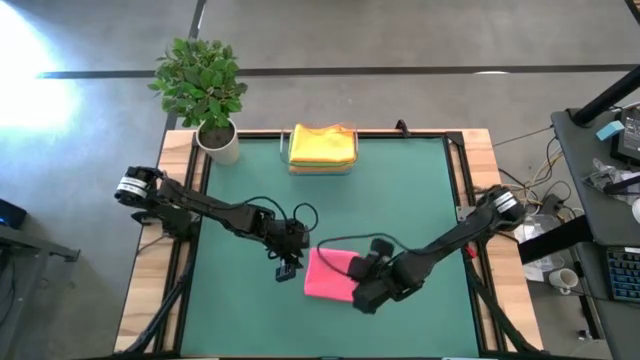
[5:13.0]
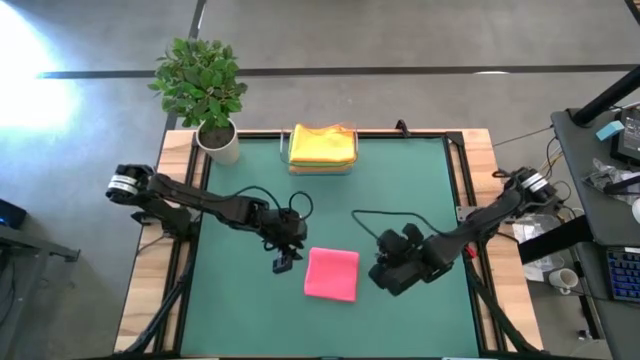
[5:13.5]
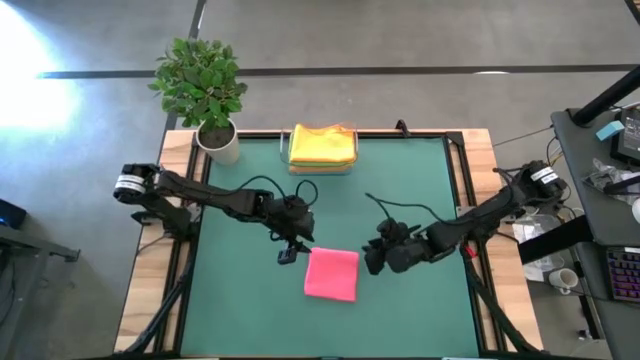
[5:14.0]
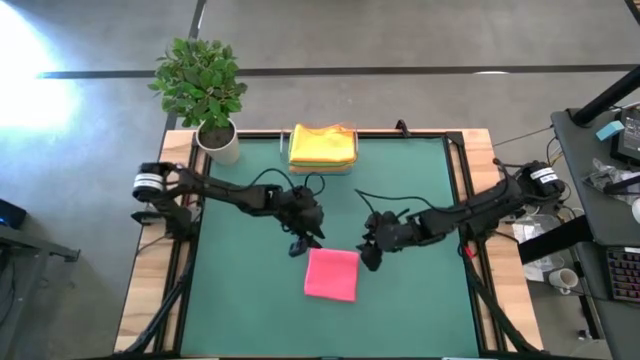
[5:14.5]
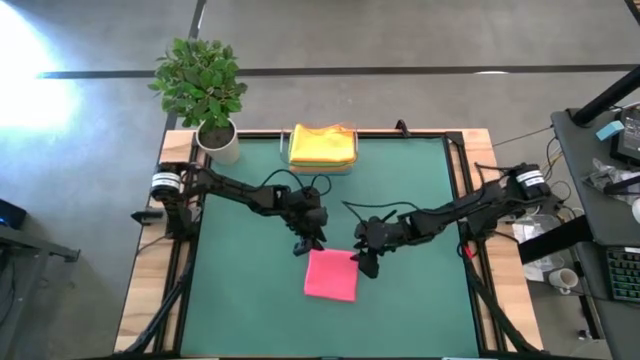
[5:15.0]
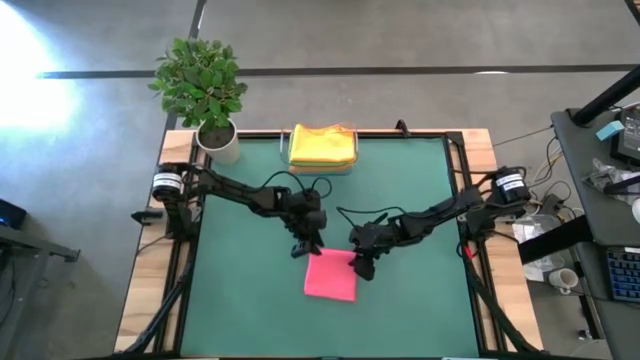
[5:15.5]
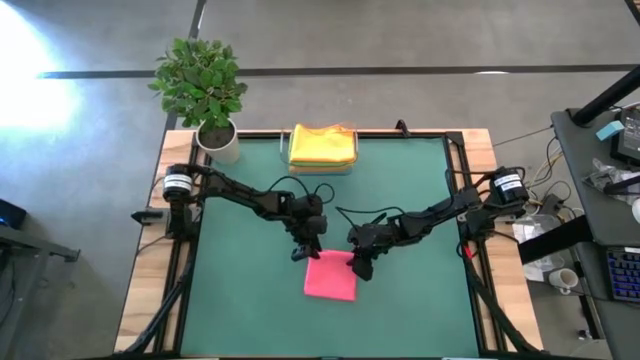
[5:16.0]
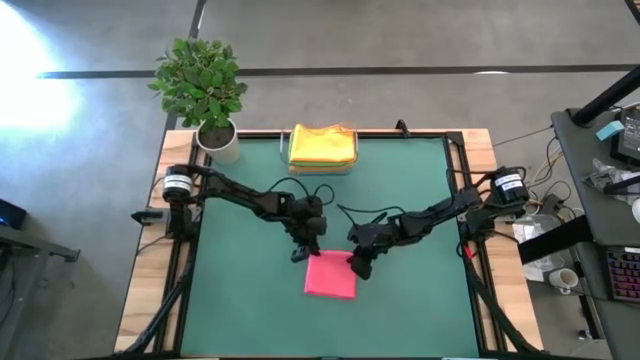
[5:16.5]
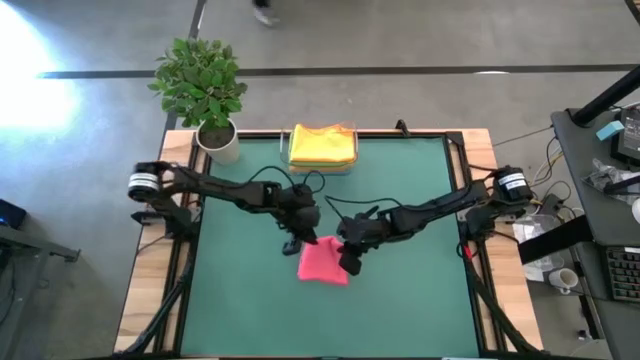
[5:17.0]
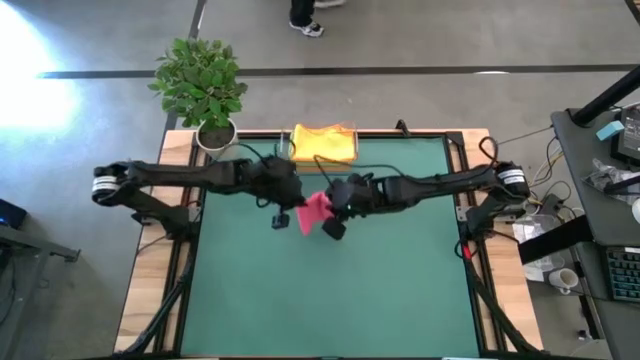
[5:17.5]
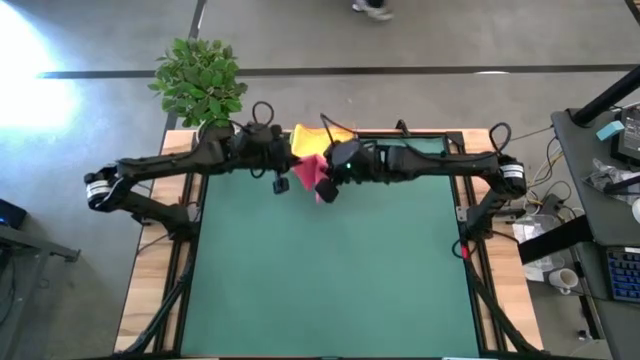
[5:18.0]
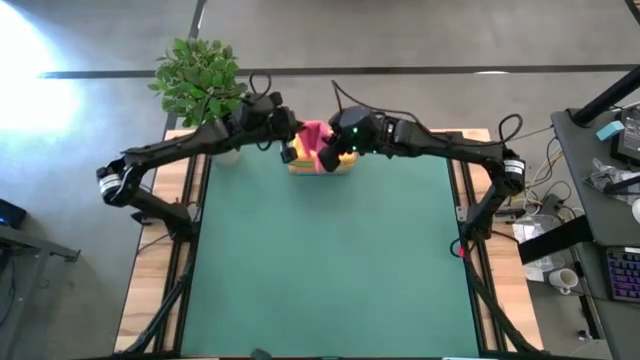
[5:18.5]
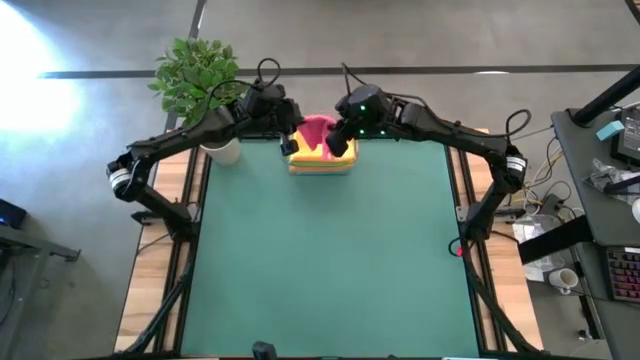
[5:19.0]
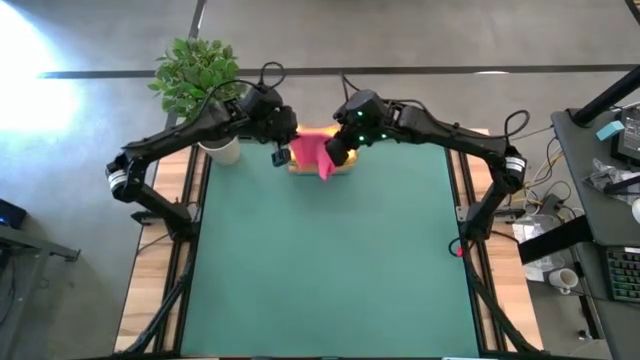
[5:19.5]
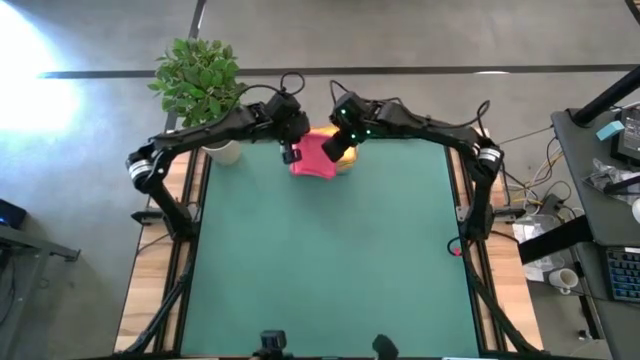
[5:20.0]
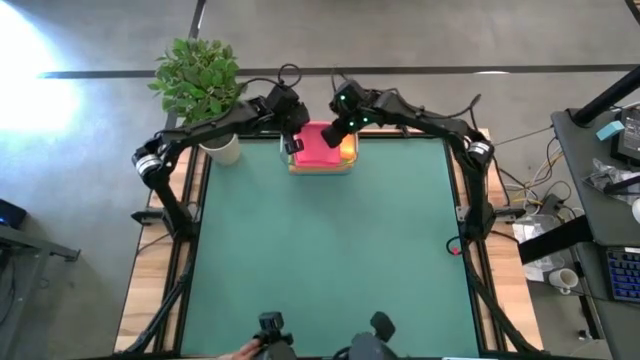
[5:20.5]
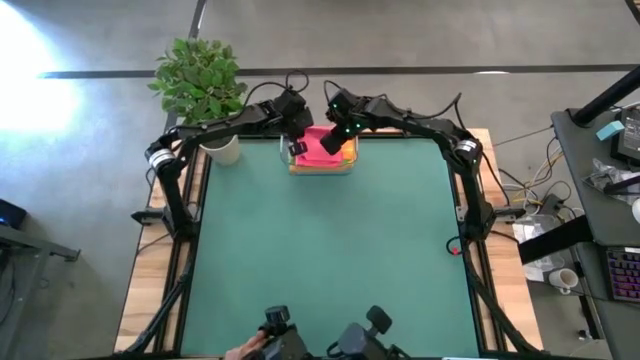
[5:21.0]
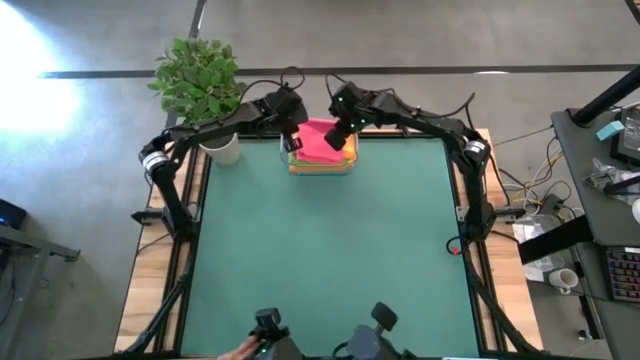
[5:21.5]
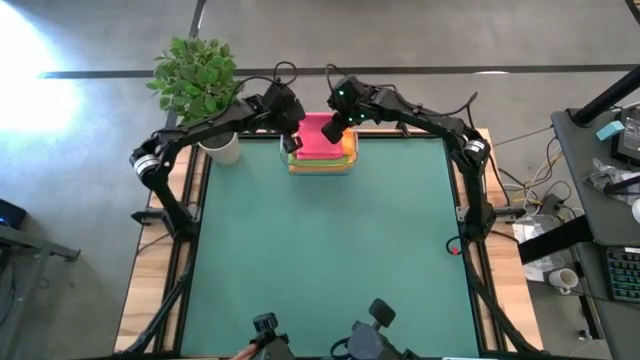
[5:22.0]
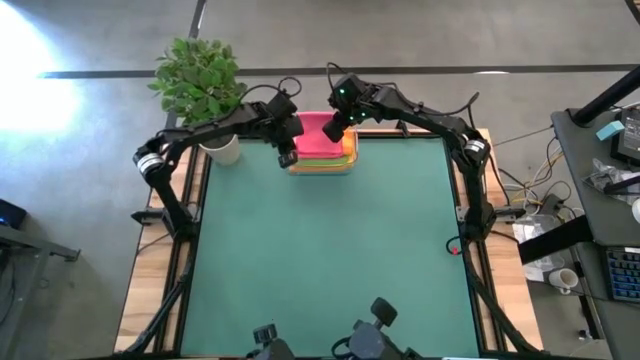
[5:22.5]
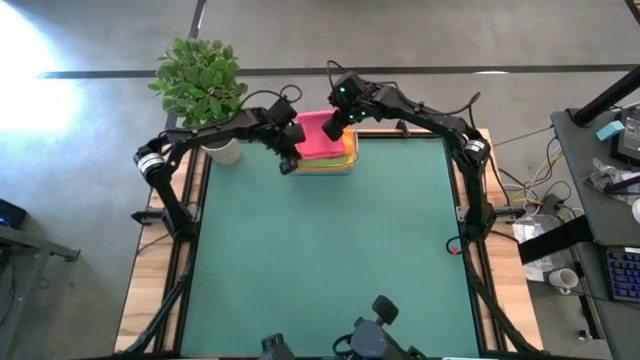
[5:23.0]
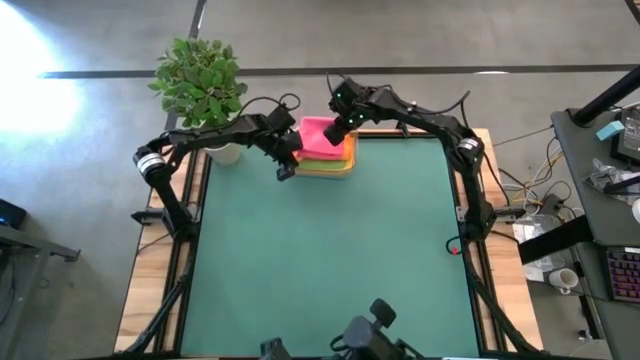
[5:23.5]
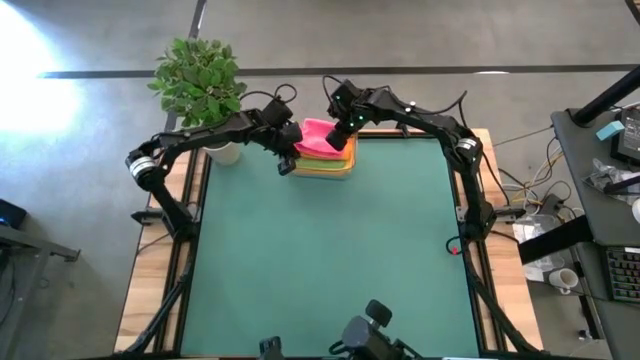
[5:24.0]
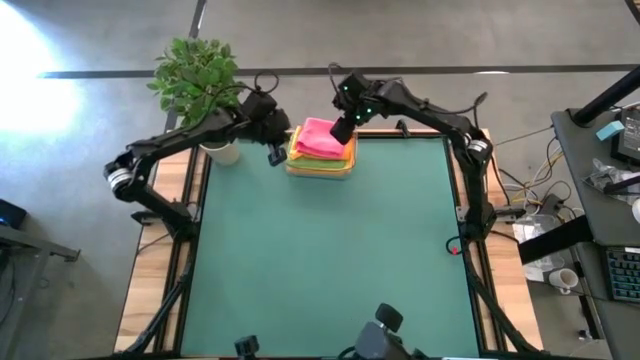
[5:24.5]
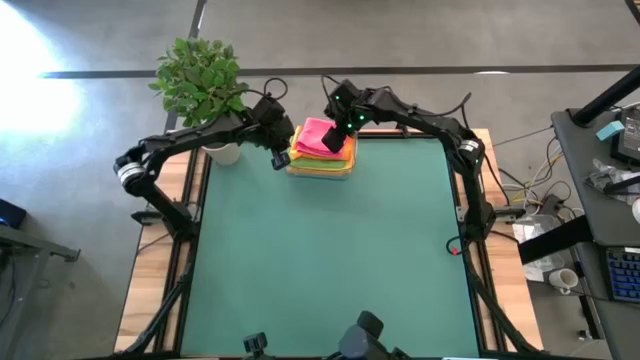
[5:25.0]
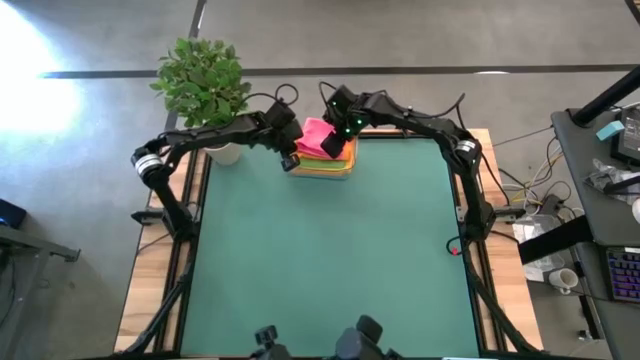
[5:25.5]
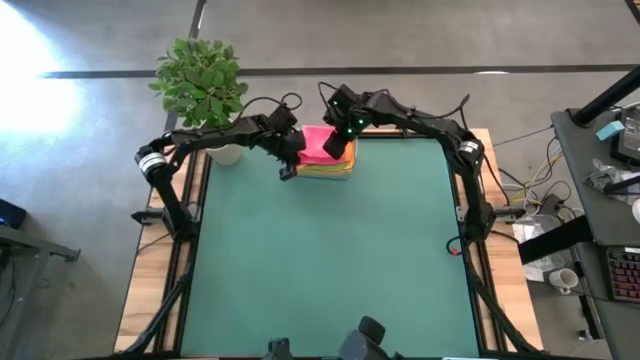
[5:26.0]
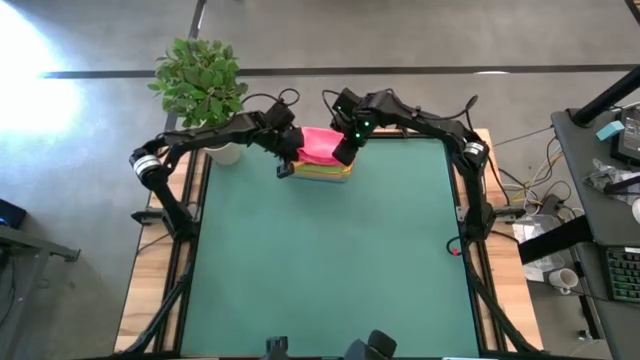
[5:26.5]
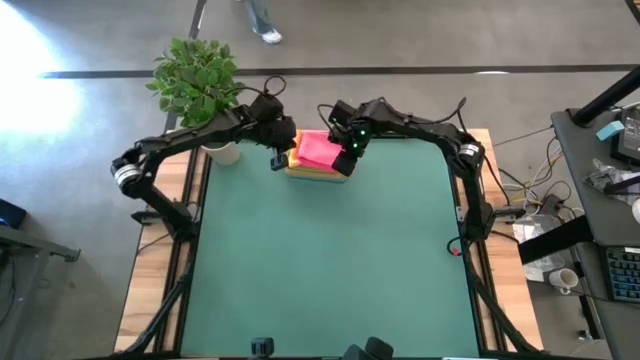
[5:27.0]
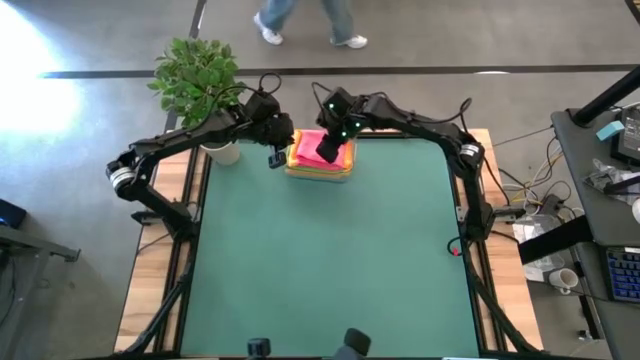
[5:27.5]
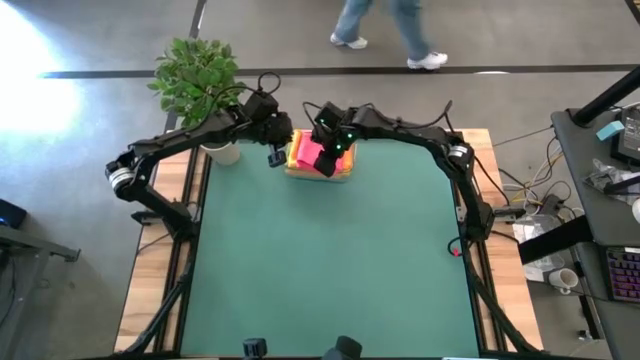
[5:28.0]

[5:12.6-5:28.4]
Task: Fold microfiber towels
Put the folded pink microfiber towel into the transparent bin
